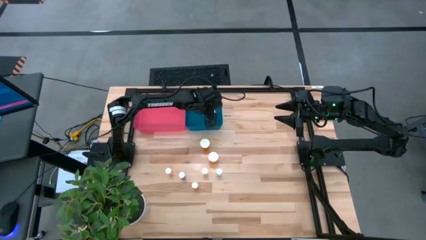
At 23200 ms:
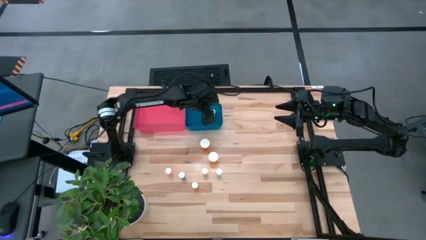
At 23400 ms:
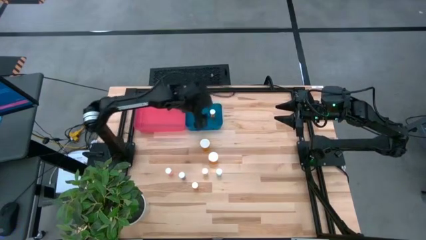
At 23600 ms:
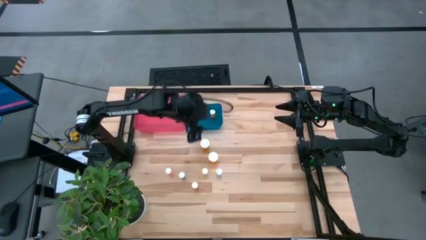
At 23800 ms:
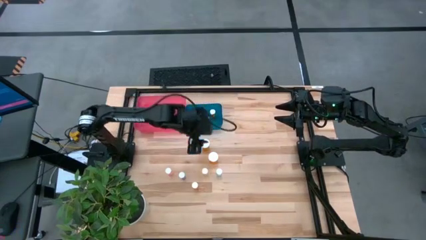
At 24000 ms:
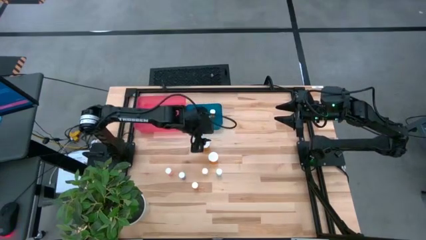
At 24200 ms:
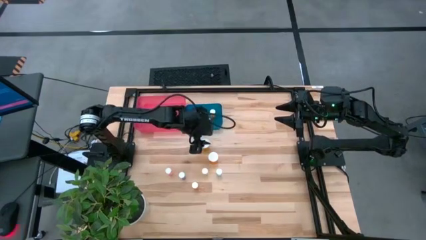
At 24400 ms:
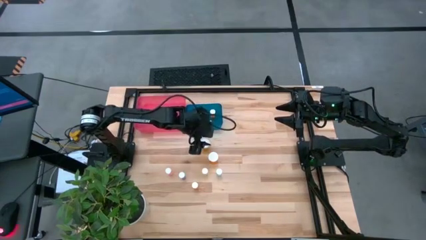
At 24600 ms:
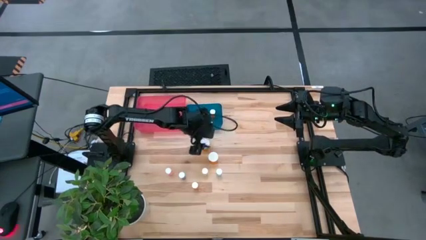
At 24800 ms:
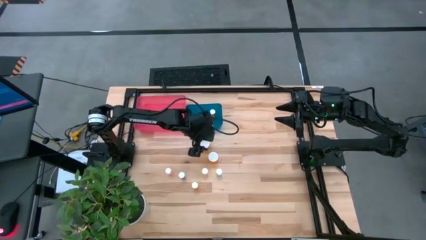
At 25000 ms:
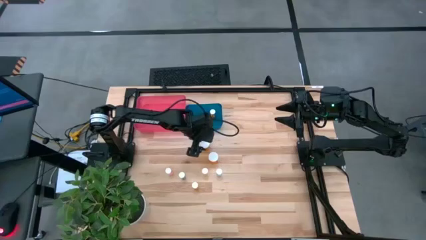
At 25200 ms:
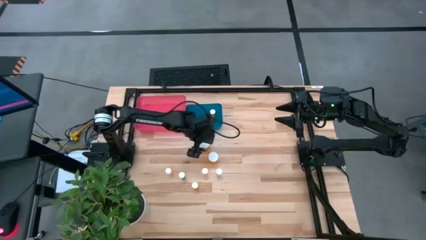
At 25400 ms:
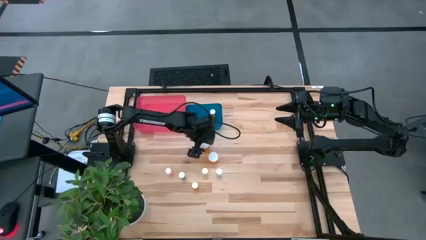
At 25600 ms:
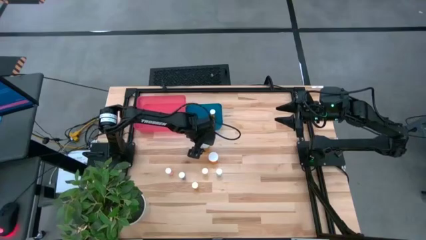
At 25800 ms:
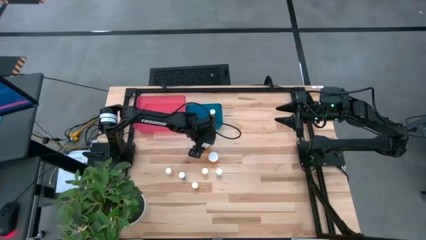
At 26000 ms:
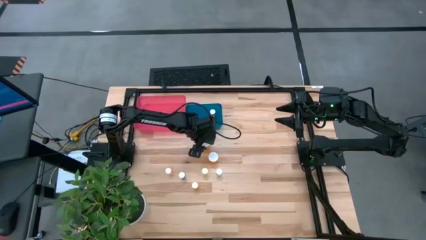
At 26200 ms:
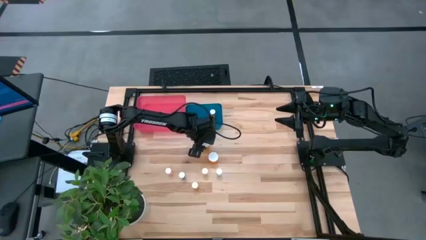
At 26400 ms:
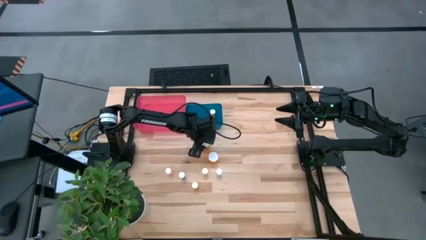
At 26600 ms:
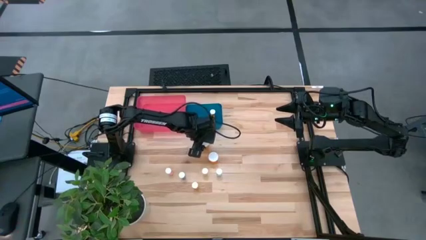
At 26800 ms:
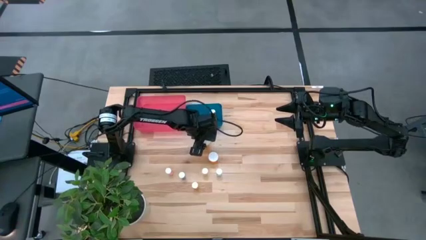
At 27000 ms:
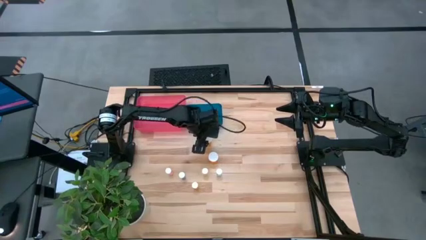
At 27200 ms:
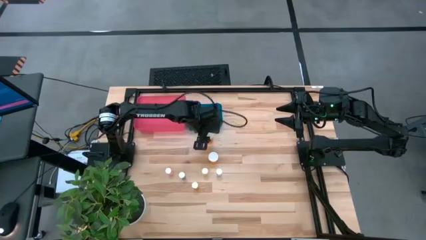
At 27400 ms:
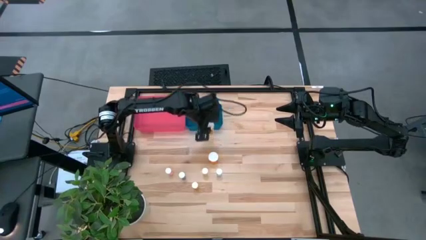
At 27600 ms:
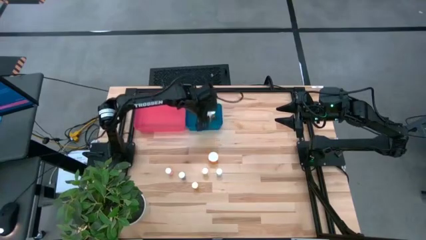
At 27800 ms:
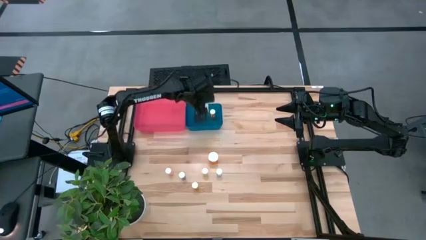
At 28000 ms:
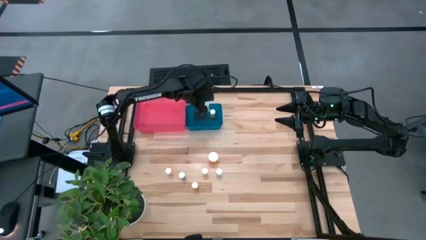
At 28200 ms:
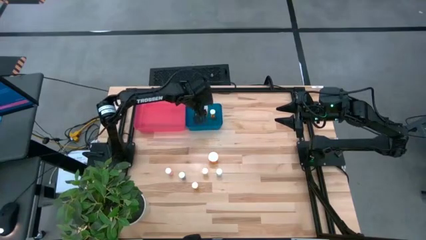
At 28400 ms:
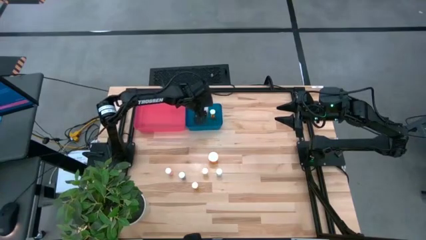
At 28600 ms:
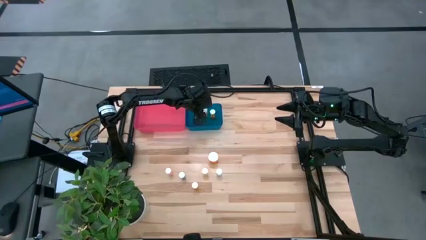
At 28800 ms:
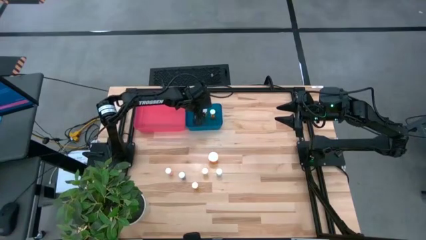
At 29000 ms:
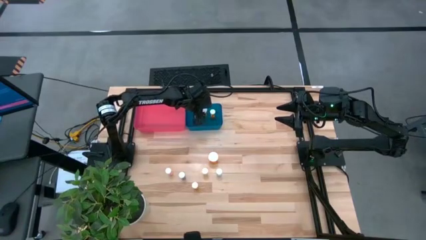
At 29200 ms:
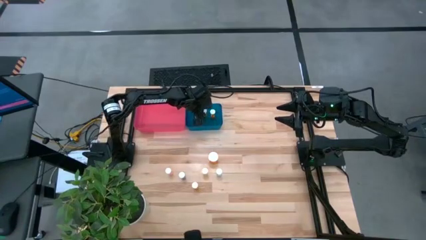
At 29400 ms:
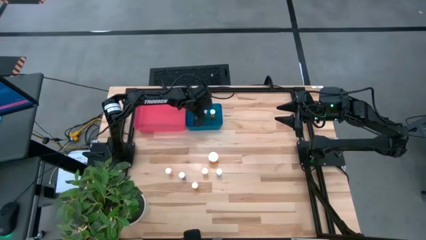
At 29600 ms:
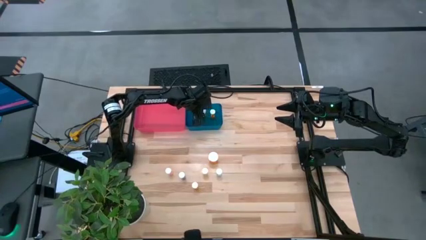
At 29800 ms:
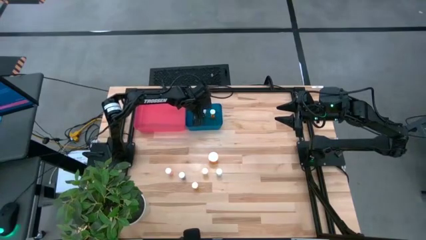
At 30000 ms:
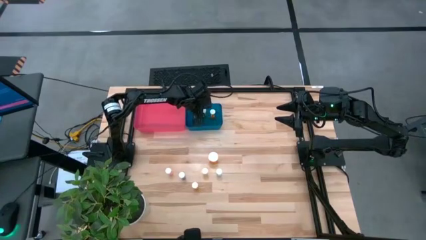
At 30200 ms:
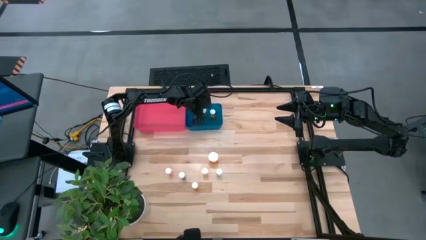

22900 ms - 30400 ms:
Task: Pick and place medicine bottles into bin by pill shape (circle, oval)
Put the orange capsule bottle into the blue bin

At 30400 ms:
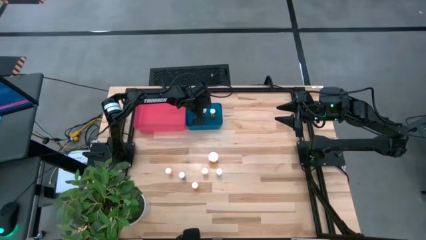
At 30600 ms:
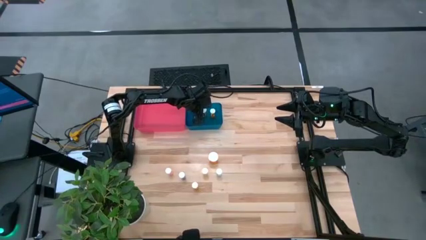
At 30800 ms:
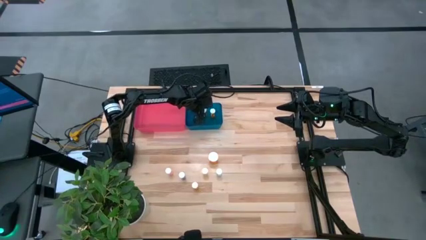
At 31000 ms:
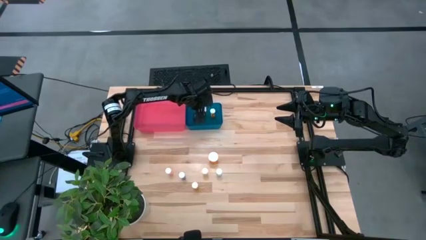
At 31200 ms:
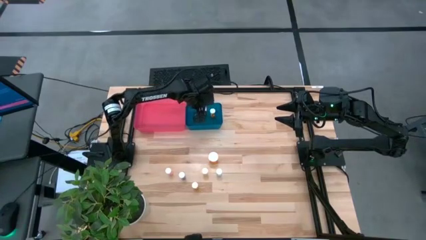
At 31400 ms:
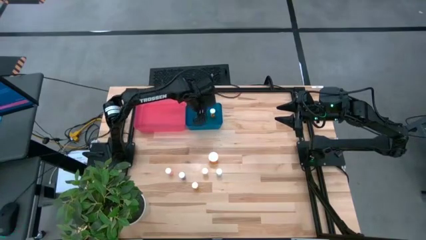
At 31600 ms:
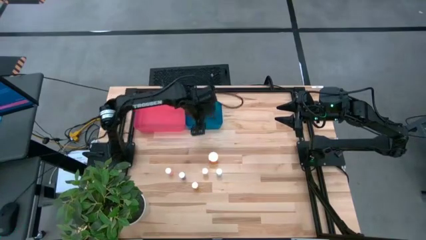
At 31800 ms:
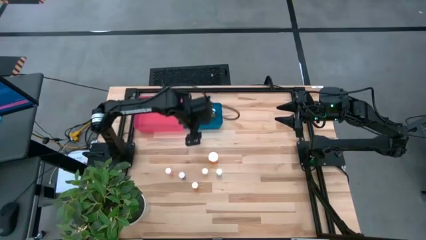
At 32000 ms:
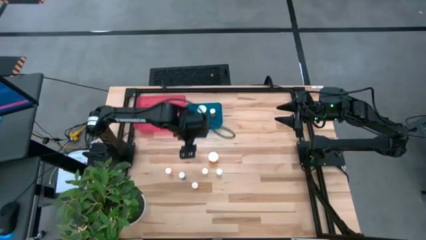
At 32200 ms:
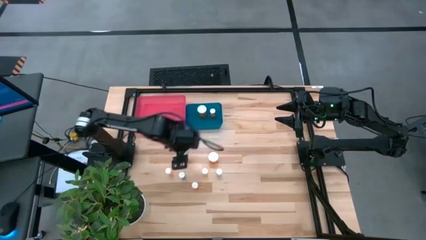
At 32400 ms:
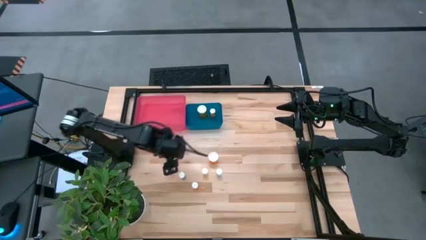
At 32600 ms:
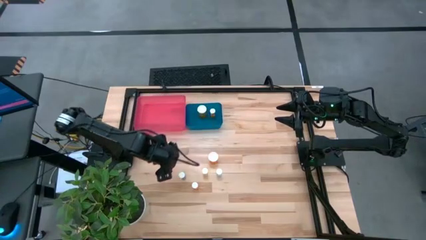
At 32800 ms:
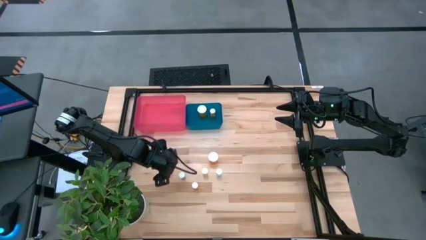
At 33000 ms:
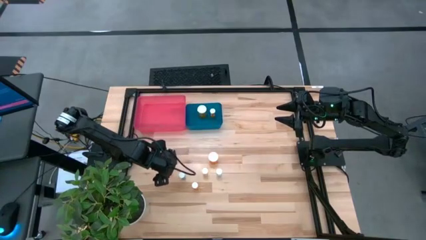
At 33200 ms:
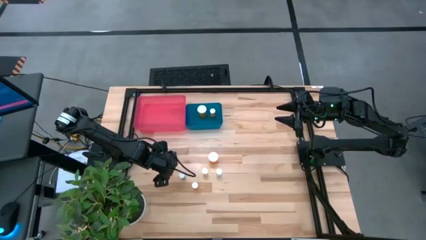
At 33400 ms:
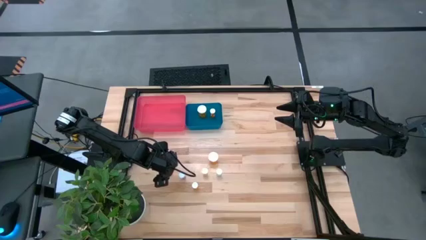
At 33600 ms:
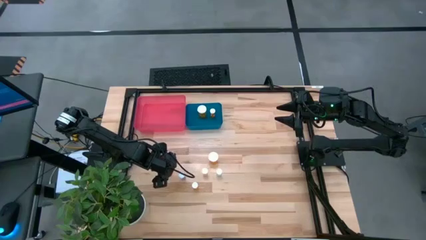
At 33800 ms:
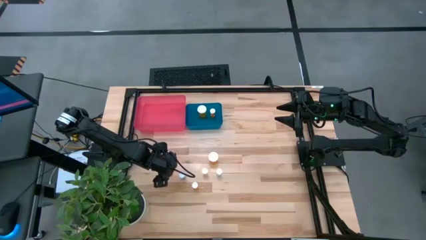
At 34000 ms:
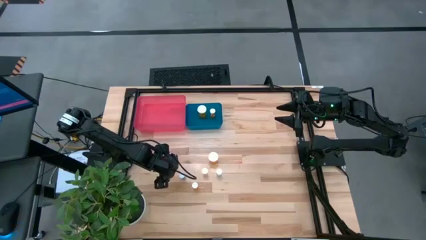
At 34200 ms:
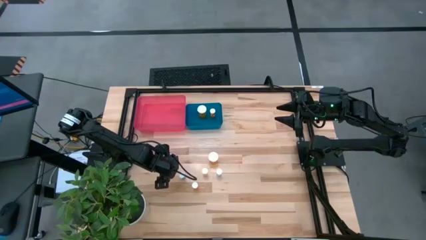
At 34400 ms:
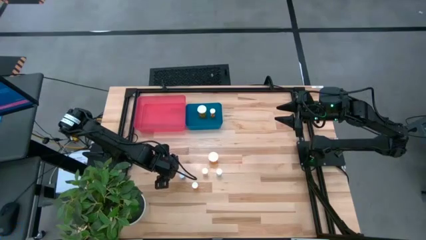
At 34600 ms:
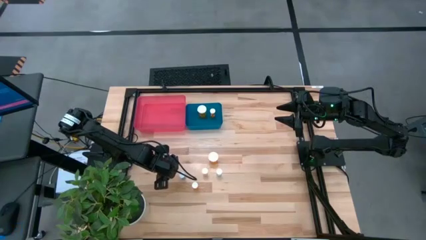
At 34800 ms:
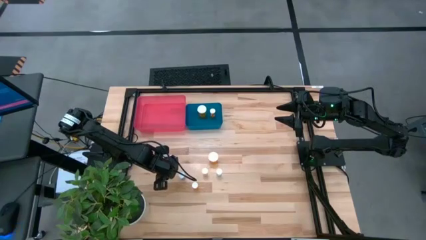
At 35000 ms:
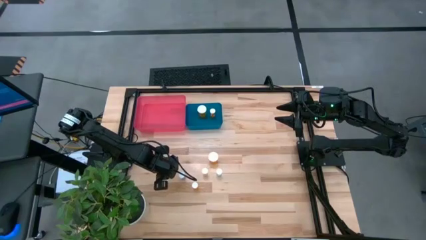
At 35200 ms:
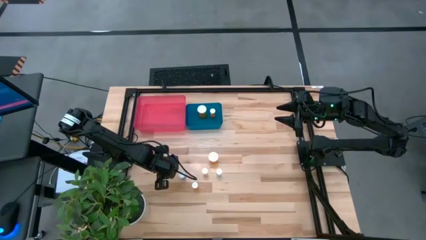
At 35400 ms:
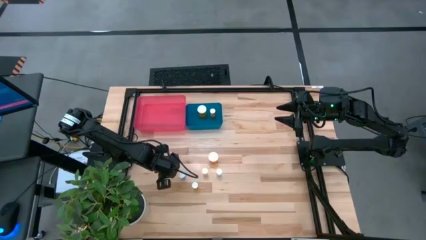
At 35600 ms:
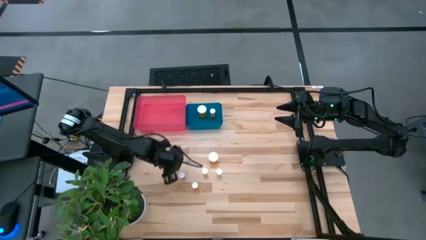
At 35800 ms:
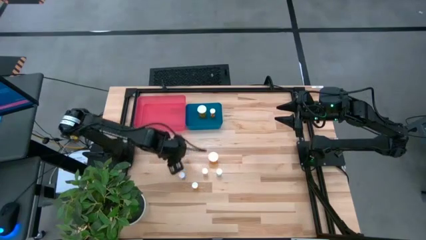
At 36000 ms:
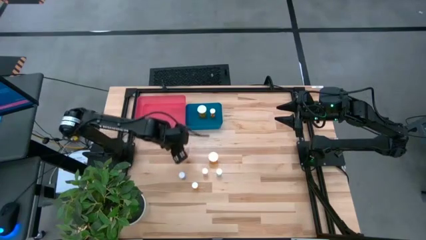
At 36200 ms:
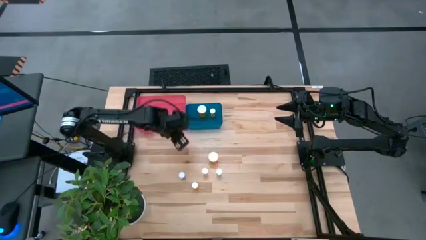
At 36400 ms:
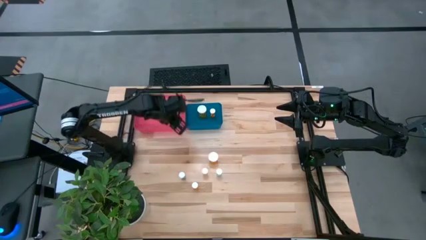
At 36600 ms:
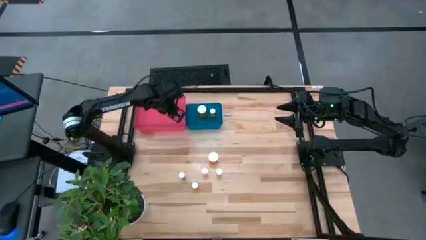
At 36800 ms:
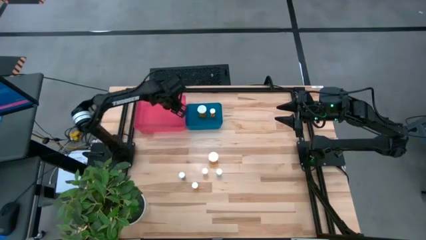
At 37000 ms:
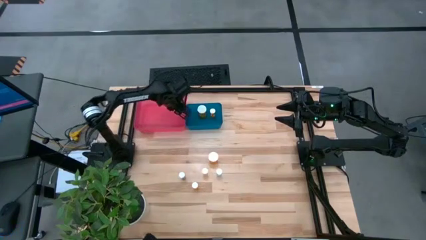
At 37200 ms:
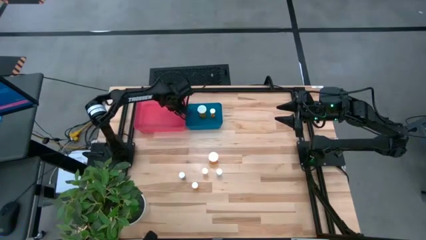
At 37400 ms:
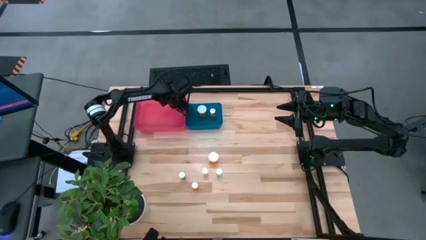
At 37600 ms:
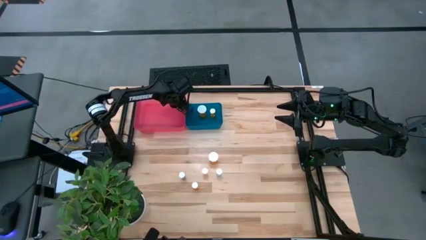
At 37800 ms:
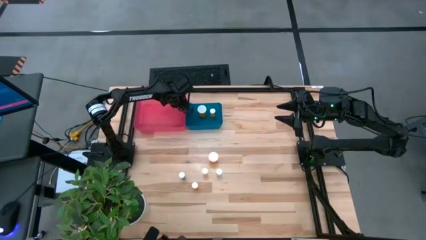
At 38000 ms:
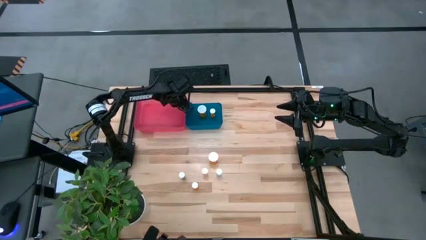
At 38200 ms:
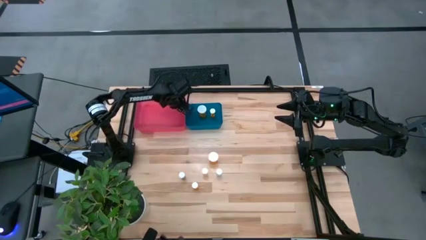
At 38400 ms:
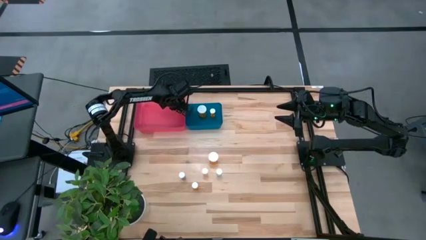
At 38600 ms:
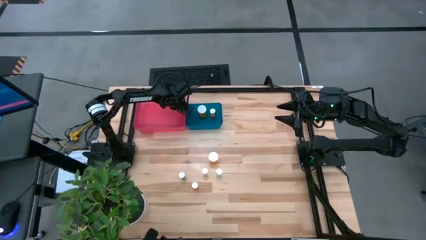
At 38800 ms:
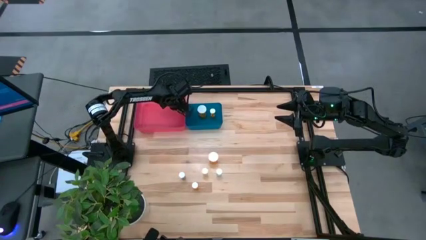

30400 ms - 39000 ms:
Put the pink tablet bottle into the pink bin
